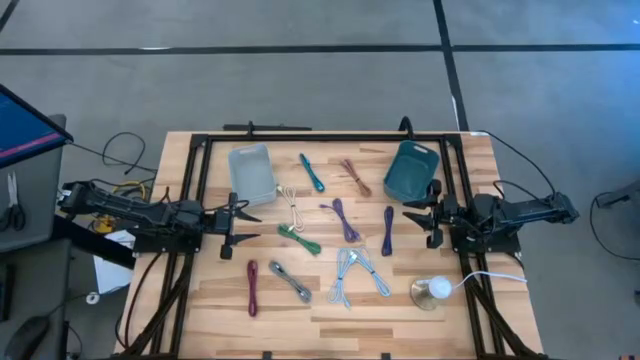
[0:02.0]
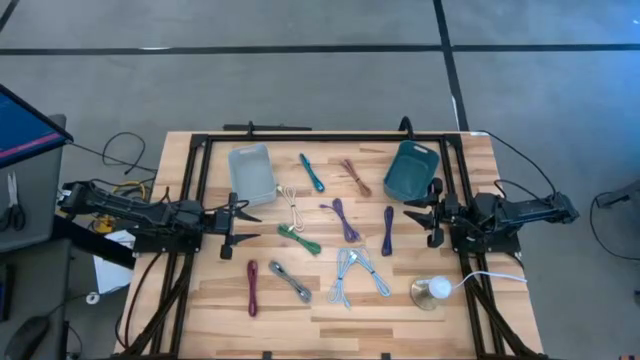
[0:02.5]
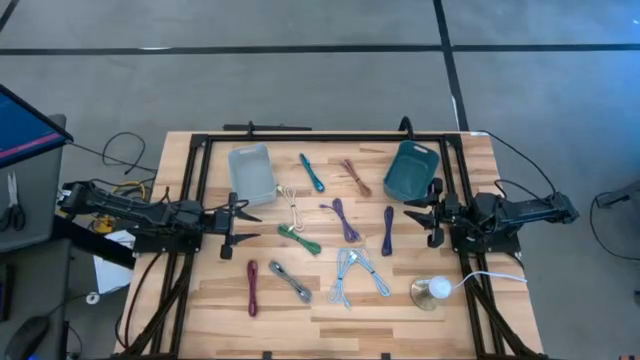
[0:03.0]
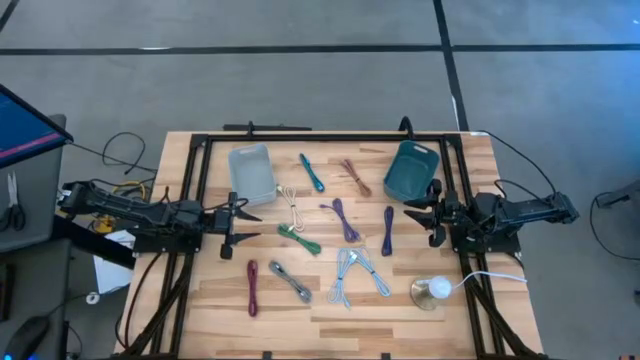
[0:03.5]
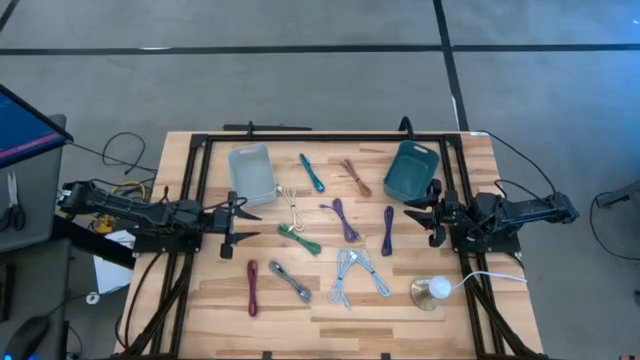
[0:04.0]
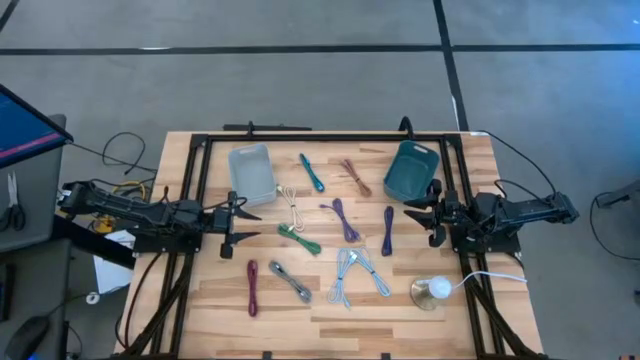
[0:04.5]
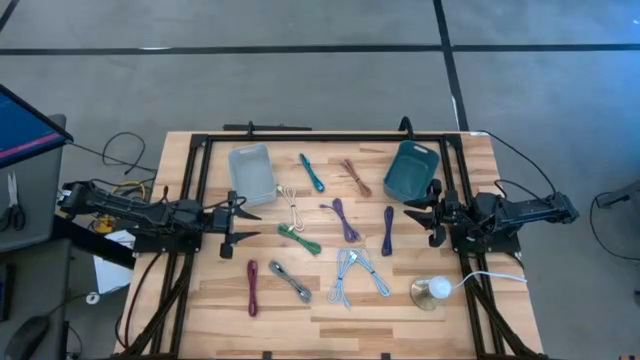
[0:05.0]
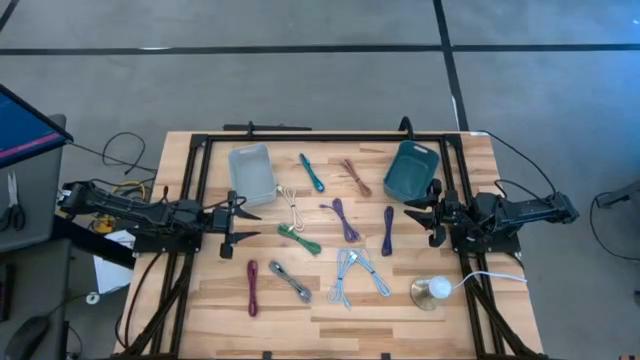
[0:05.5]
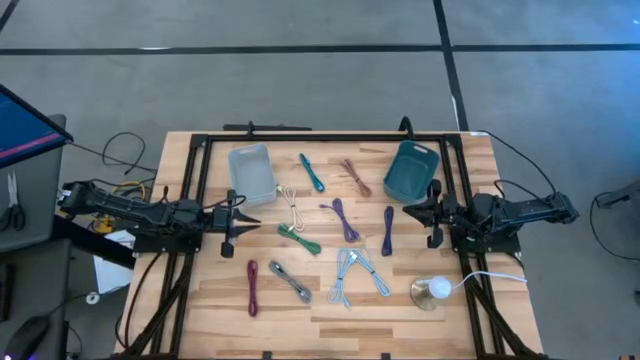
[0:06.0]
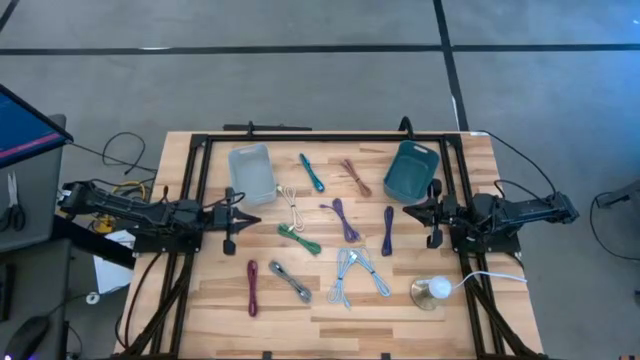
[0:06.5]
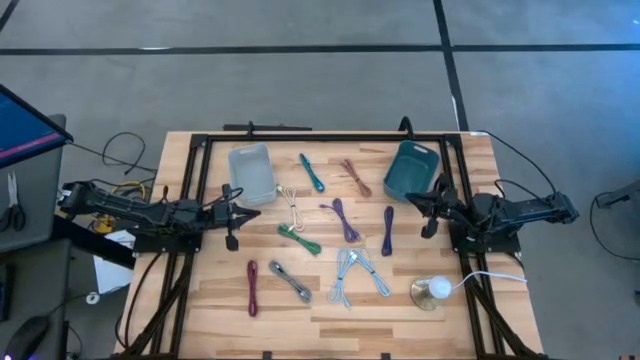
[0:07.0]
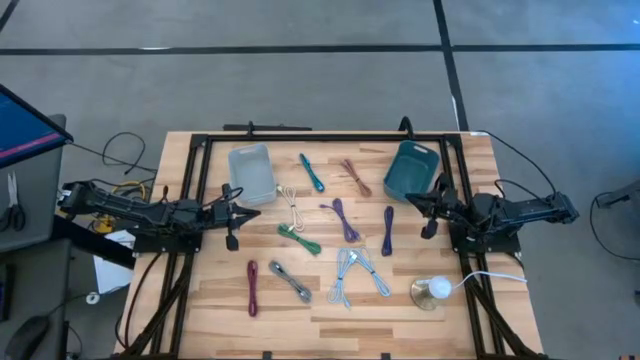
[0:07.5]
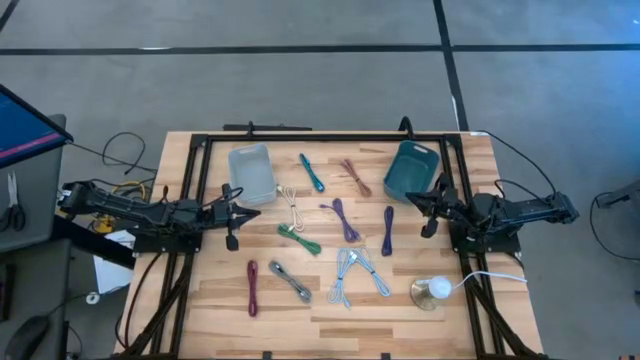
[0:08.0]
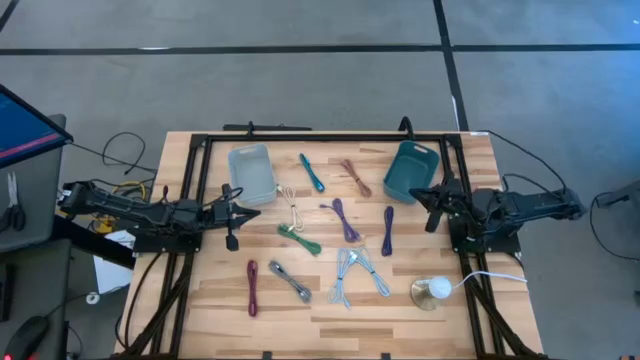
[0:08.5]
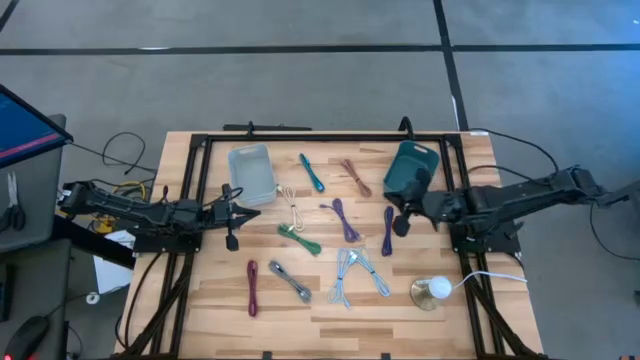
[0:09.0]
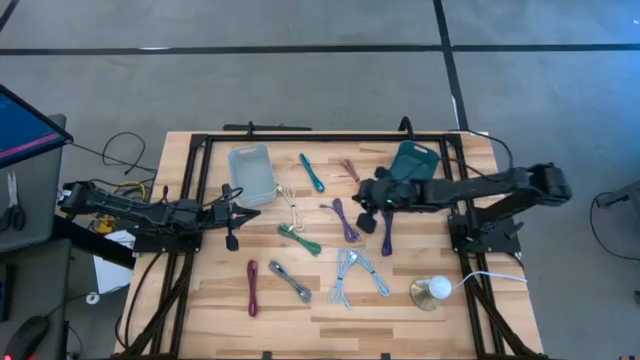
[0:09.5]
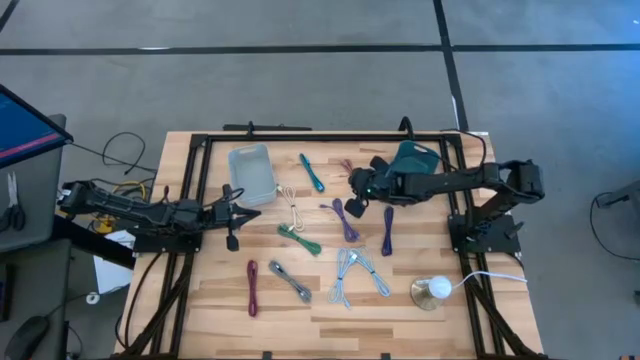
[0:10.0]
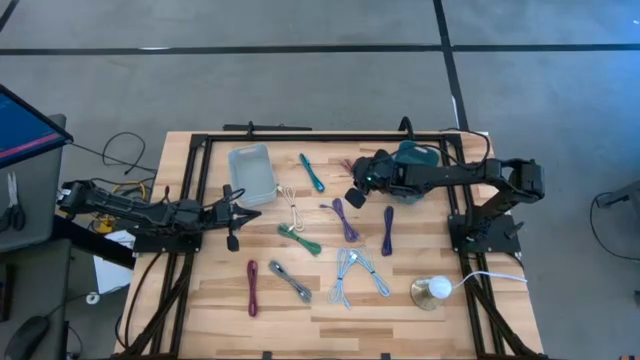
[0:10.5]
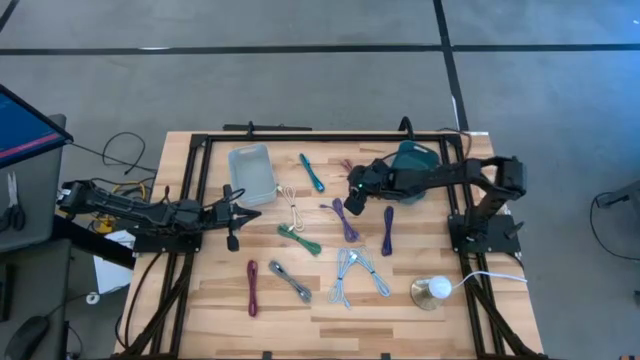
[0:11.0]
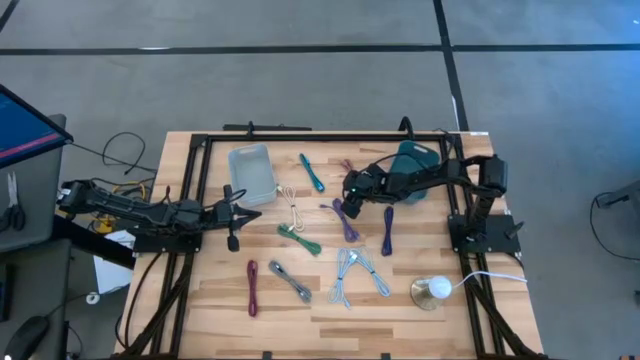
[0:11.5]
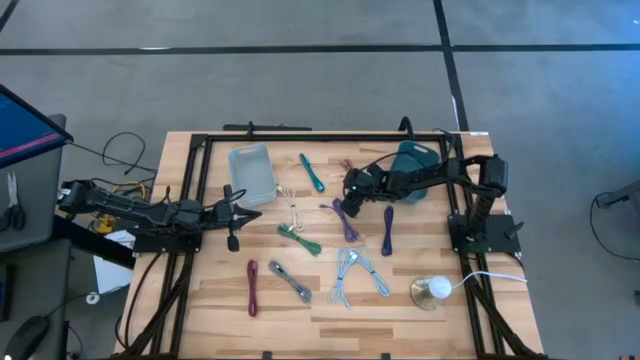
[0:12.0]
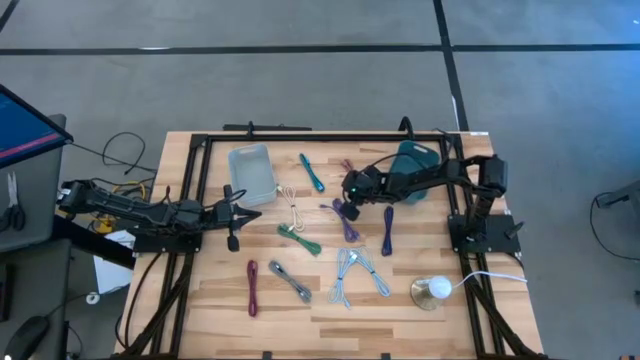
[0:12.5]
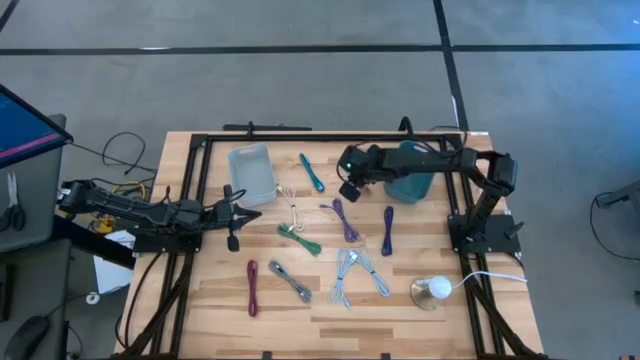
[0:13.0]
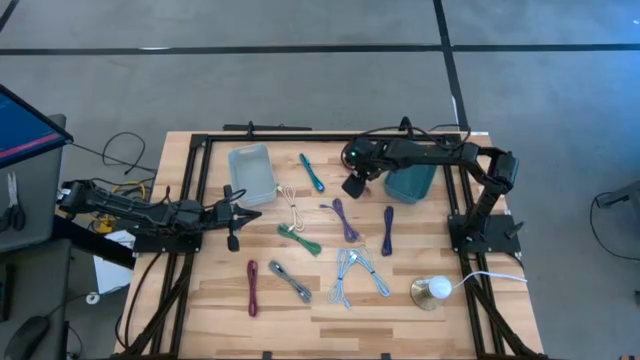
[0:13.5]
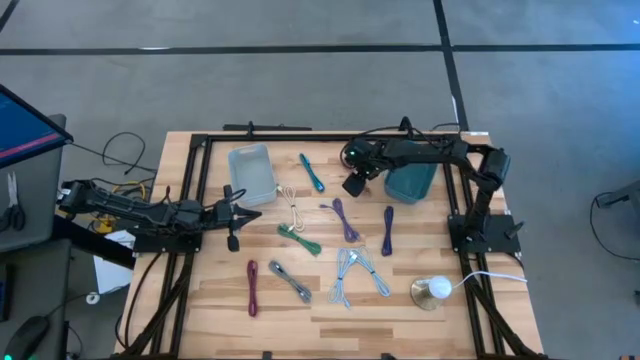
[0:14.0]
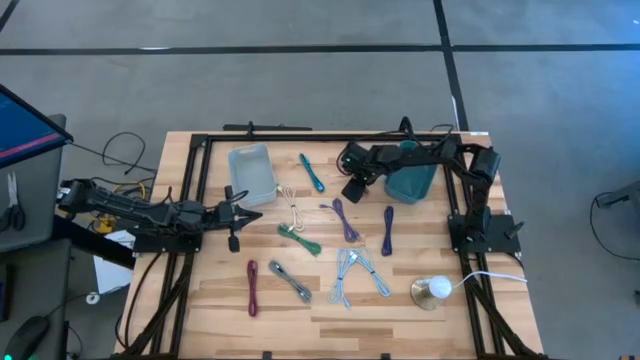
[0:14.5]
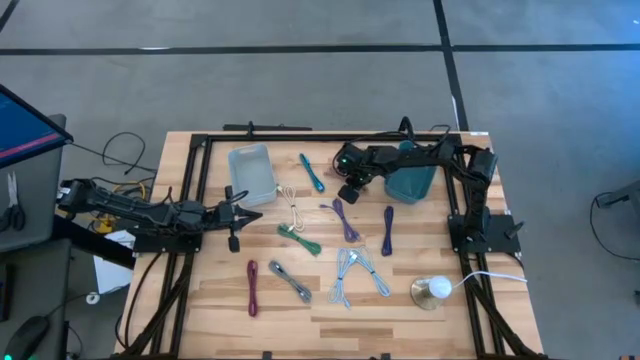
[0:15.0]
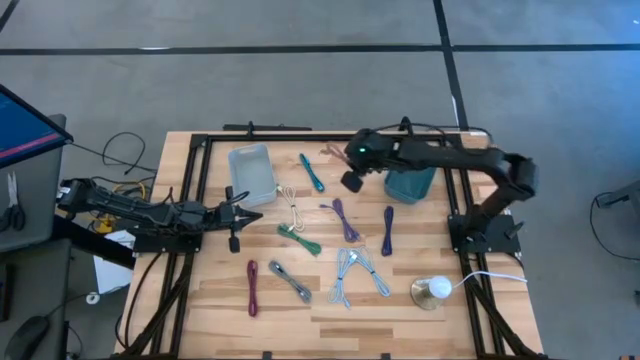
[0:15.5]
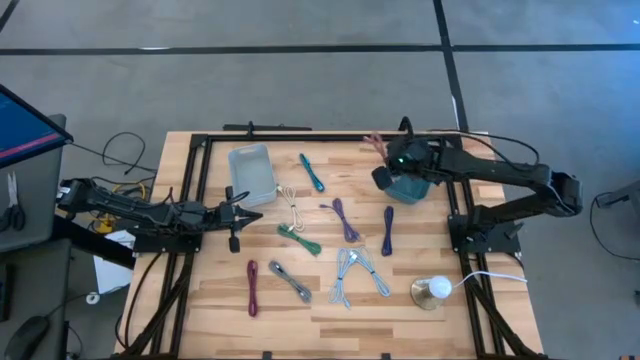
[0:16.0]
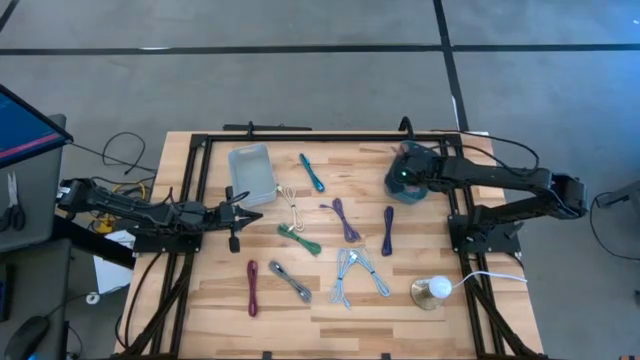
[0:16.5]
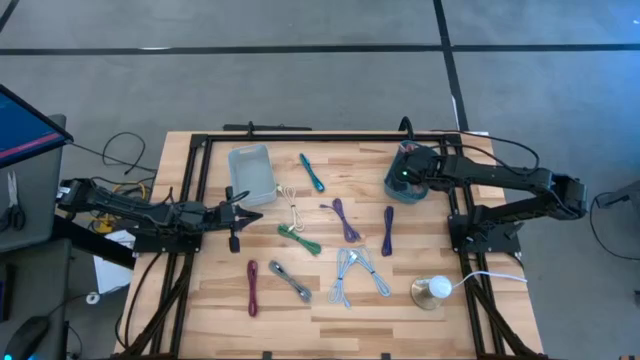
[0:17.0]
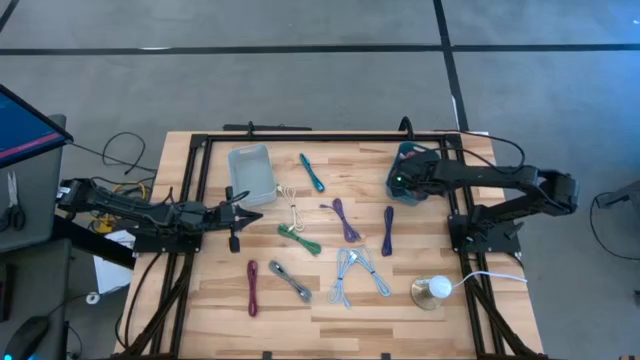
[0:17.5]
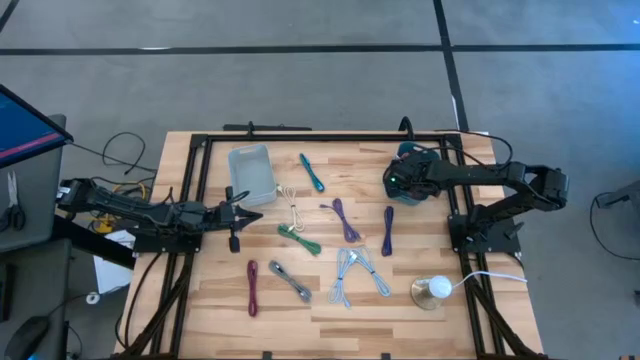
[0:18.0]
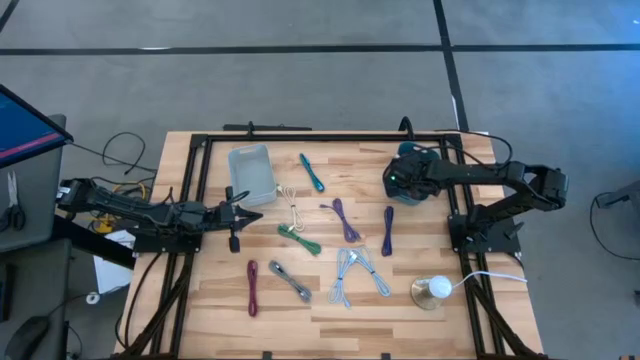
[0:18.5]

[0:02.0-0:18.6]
Task: Pick & Place USB Port
Put the pink USB cable into the blue bin

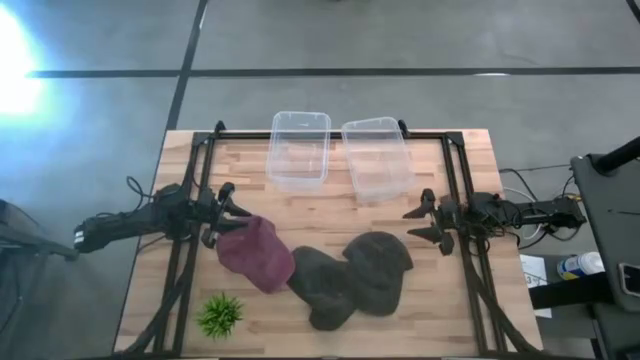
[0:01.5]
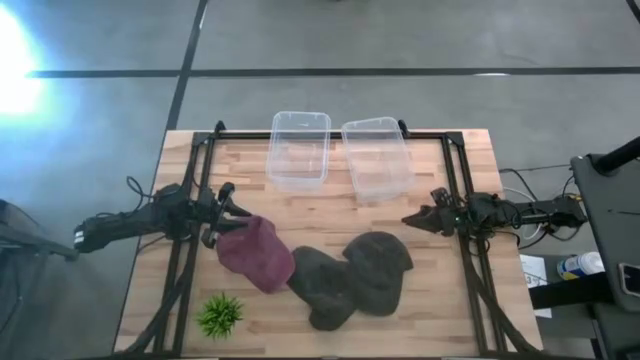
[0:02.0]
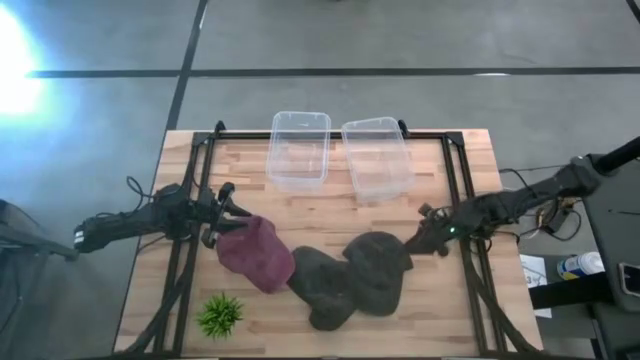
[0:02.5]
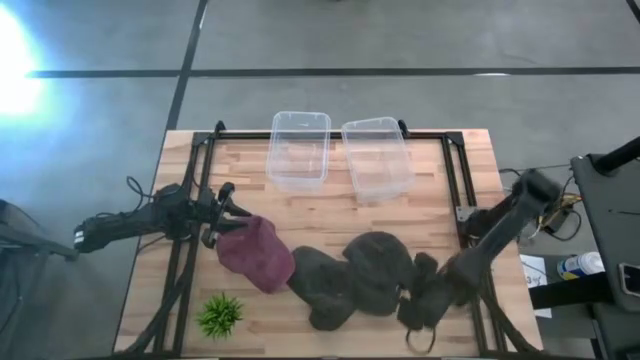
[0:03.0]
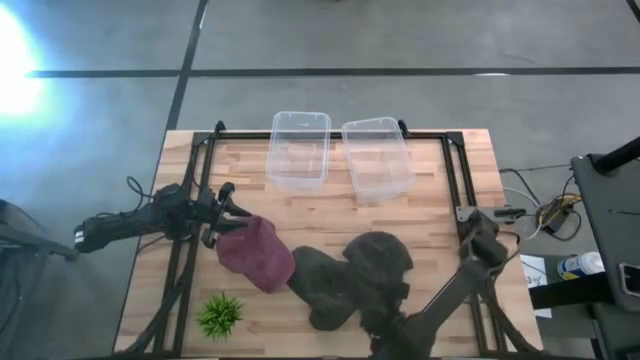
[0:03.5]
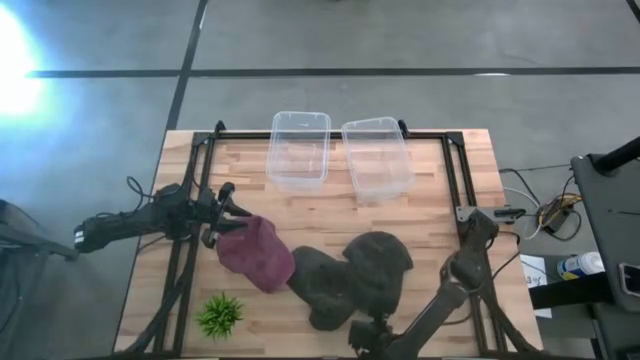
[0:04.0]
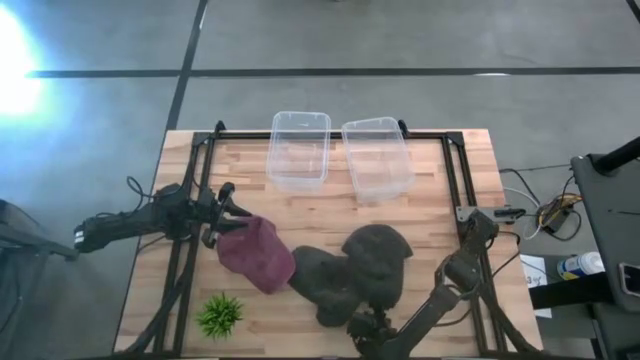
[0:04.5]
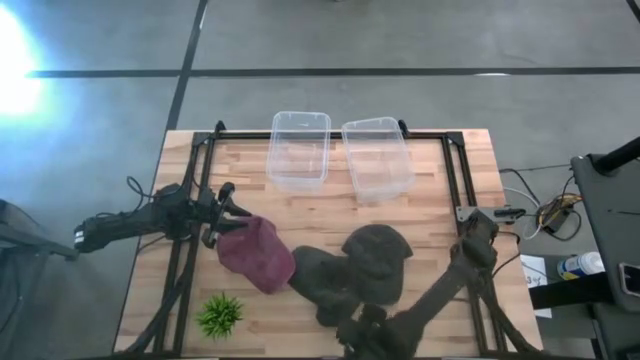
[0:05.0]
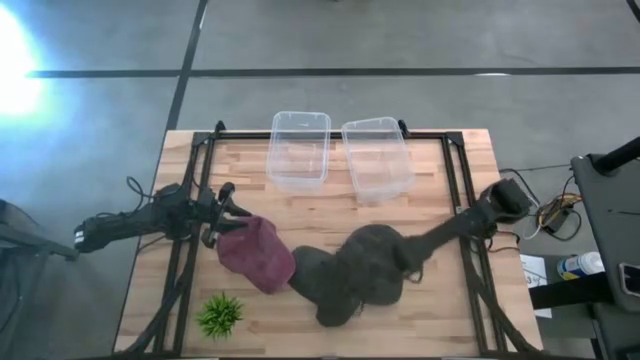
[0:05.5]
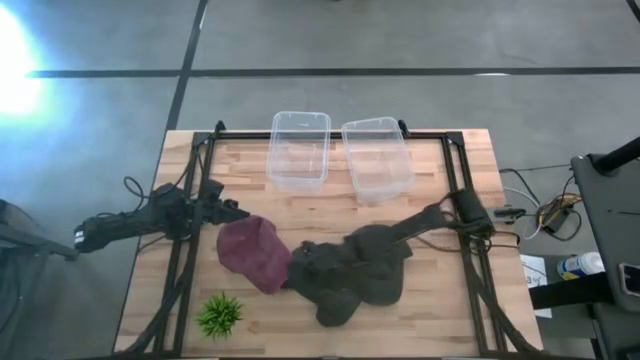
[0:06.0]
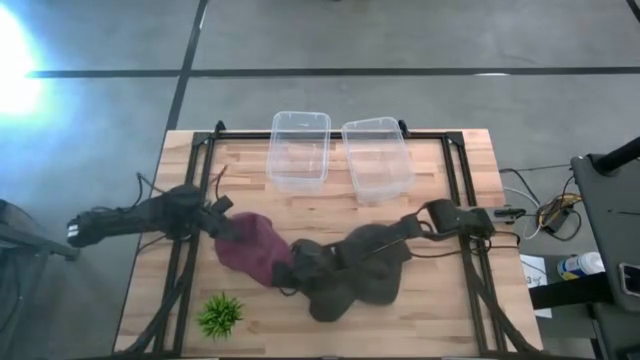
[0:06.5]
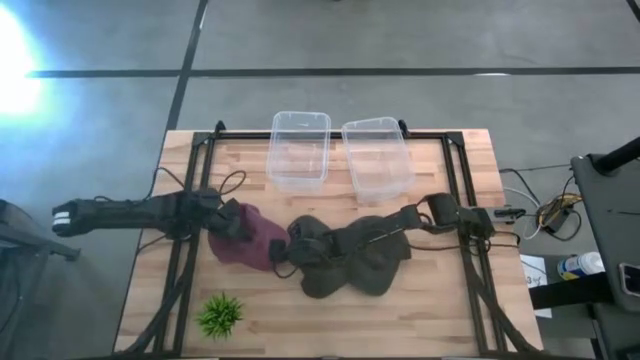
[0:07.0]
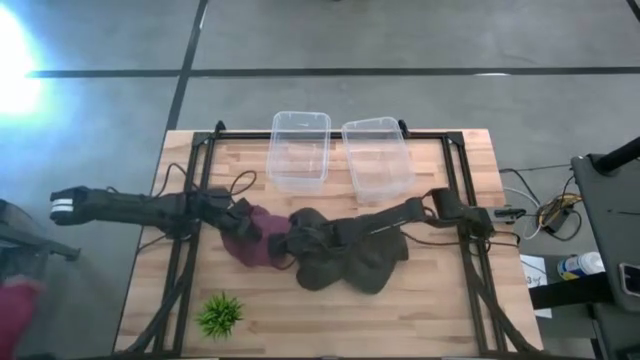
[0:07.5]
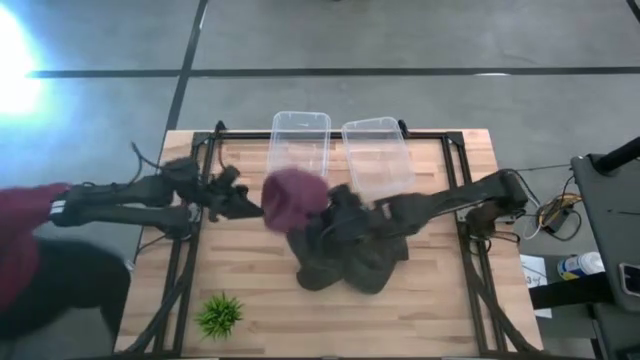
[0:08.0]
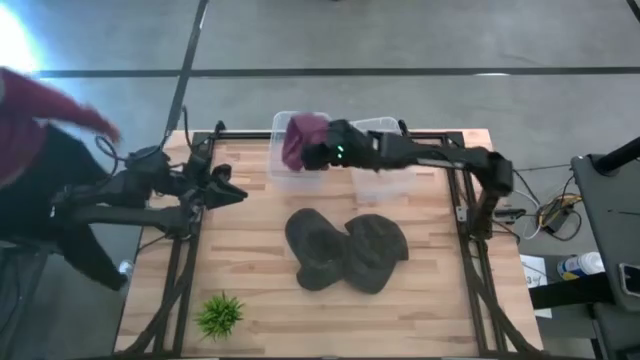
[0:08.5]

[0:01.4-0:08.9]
Task: Pick & Place hat
Put the red cap into the left transparent bin
